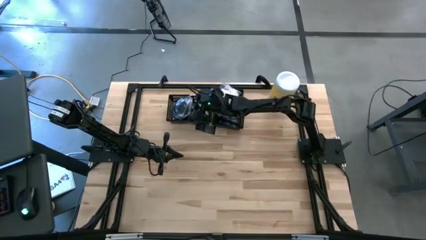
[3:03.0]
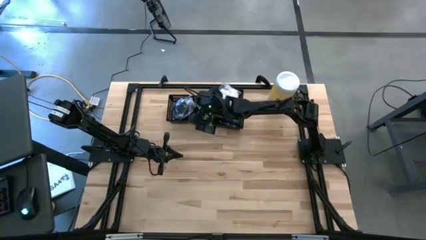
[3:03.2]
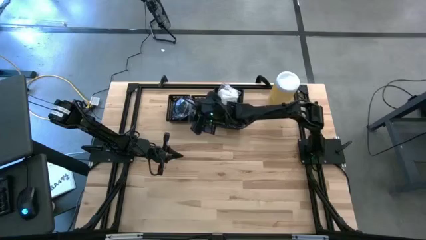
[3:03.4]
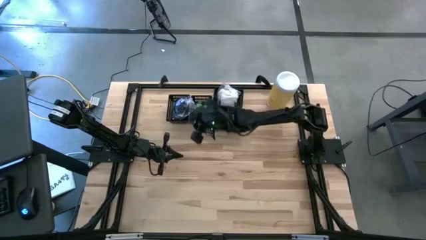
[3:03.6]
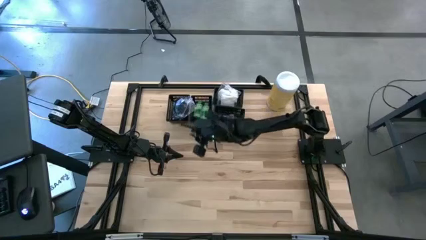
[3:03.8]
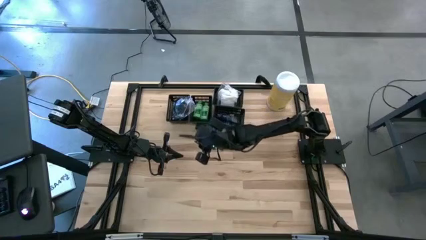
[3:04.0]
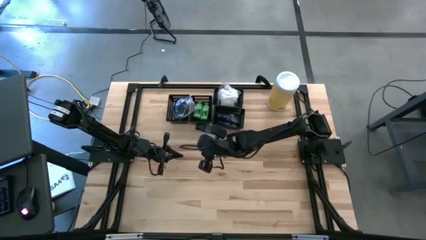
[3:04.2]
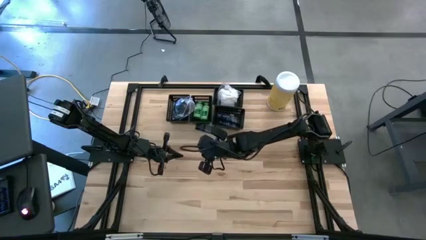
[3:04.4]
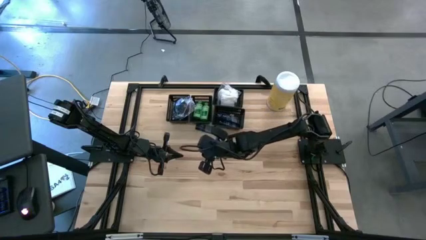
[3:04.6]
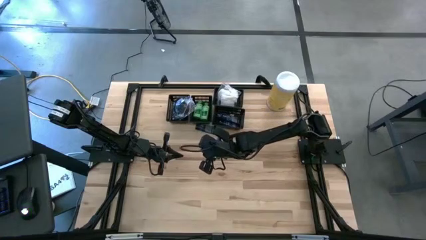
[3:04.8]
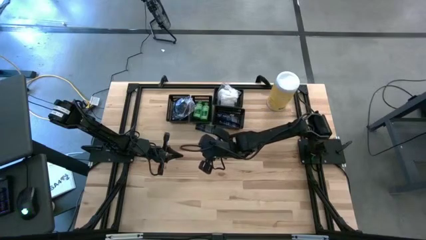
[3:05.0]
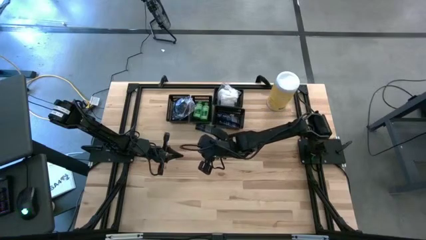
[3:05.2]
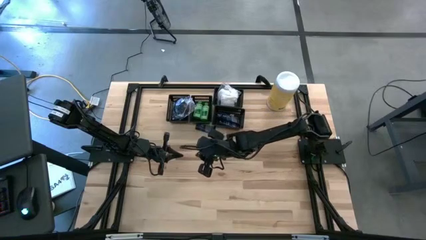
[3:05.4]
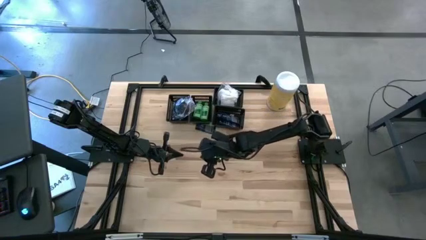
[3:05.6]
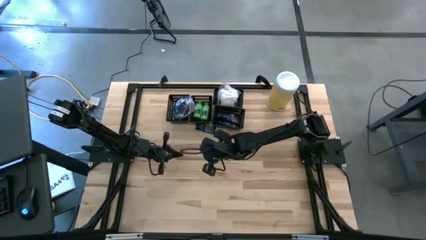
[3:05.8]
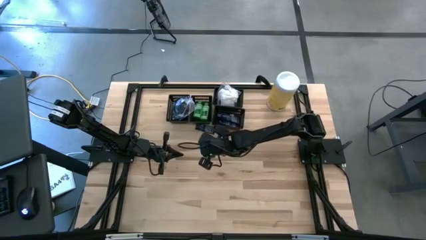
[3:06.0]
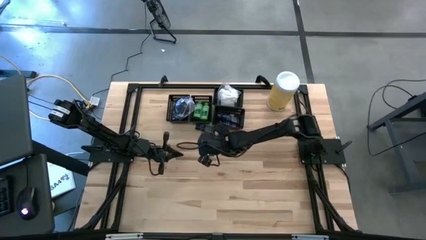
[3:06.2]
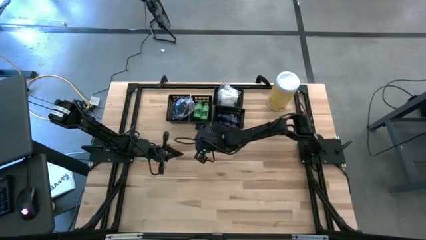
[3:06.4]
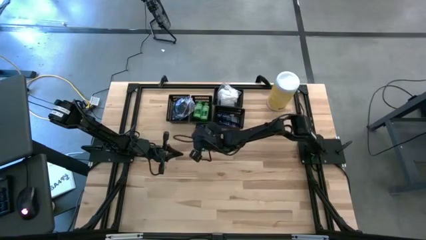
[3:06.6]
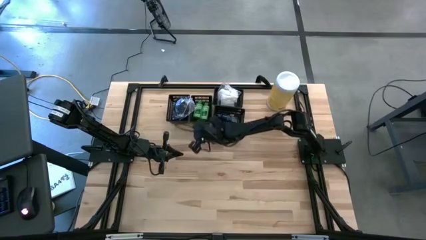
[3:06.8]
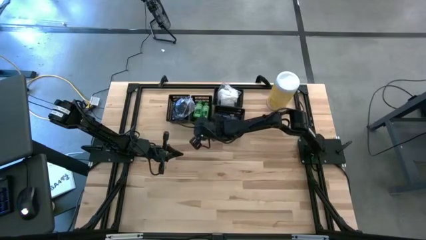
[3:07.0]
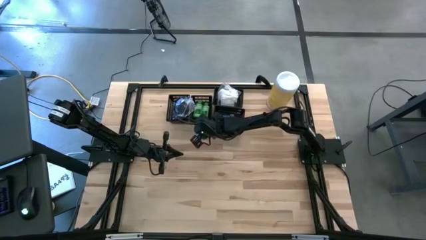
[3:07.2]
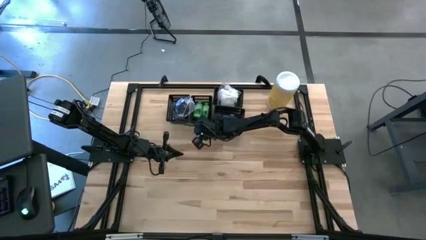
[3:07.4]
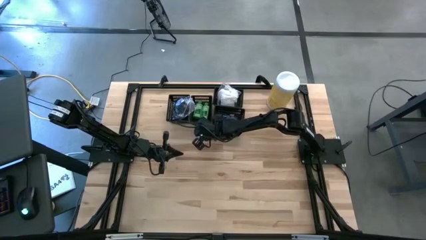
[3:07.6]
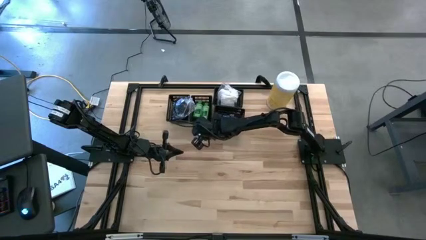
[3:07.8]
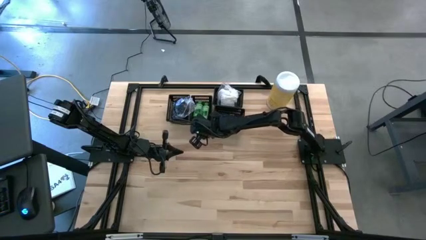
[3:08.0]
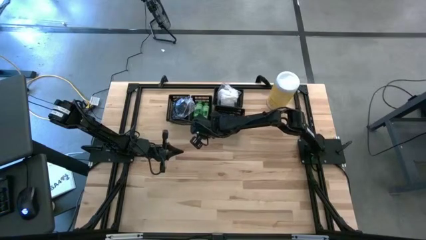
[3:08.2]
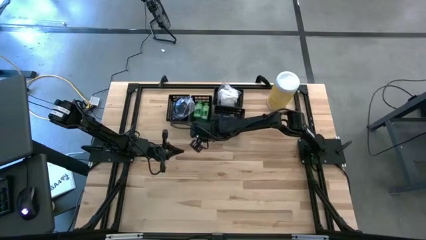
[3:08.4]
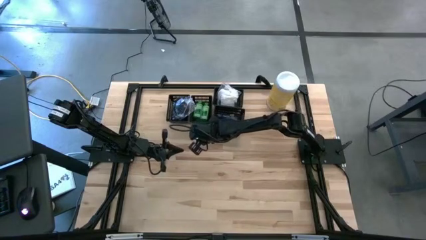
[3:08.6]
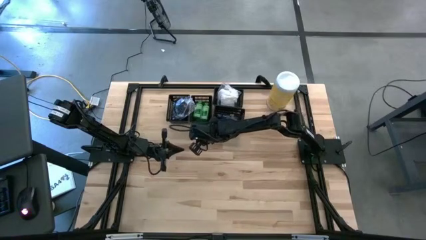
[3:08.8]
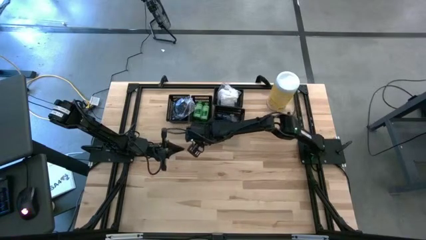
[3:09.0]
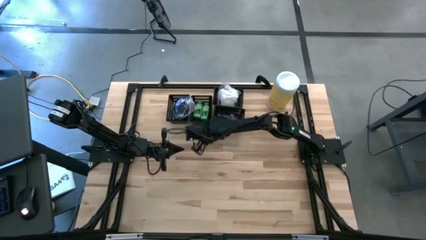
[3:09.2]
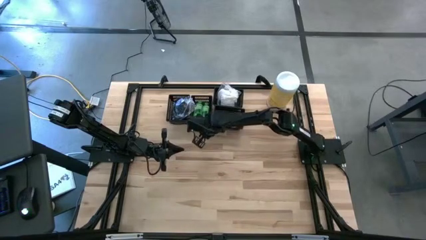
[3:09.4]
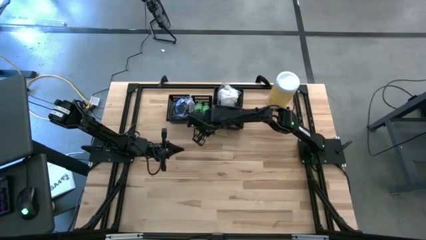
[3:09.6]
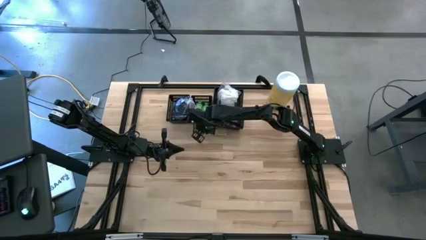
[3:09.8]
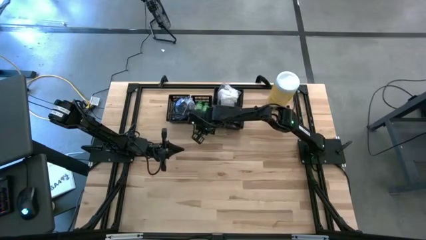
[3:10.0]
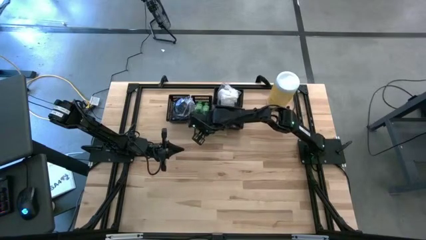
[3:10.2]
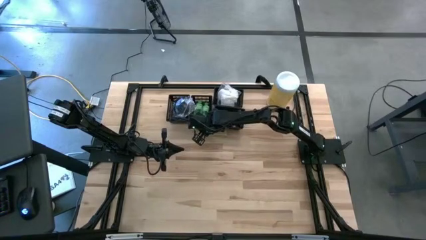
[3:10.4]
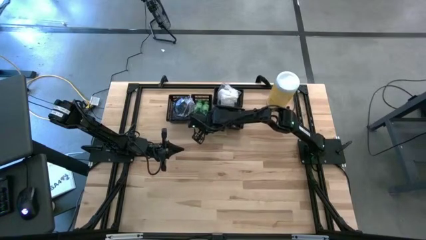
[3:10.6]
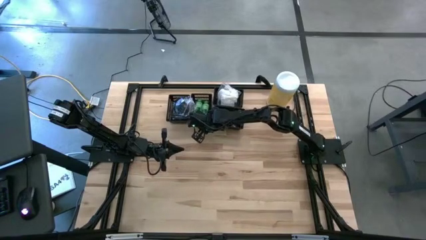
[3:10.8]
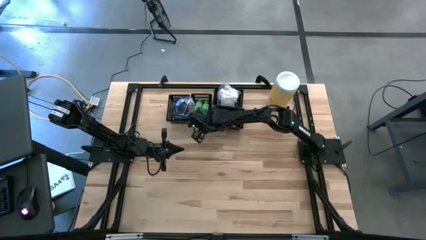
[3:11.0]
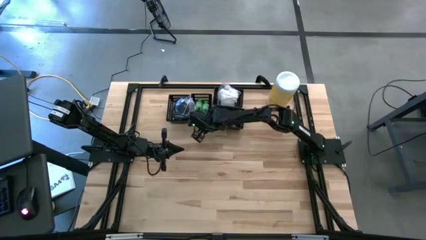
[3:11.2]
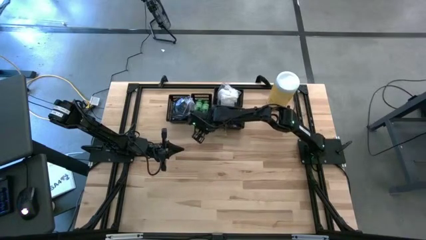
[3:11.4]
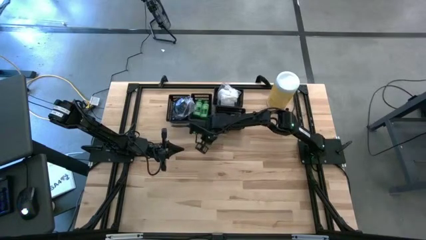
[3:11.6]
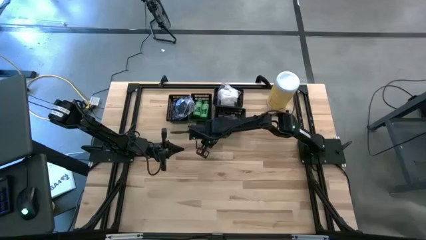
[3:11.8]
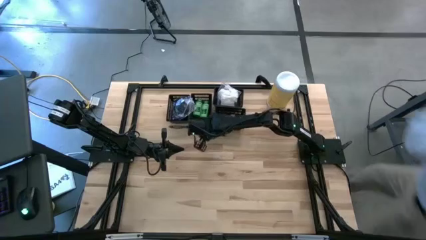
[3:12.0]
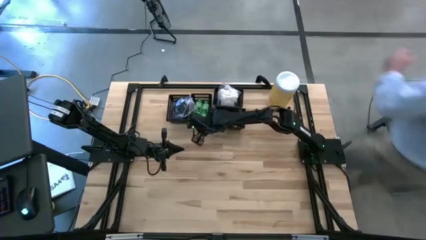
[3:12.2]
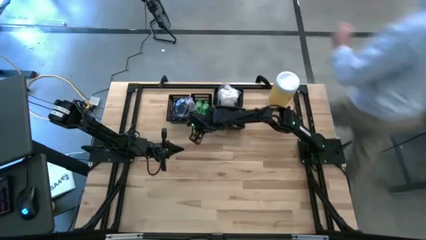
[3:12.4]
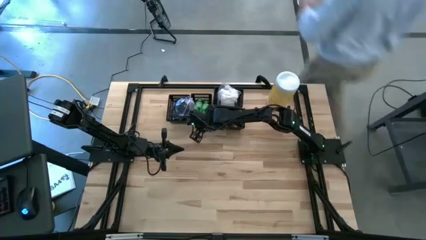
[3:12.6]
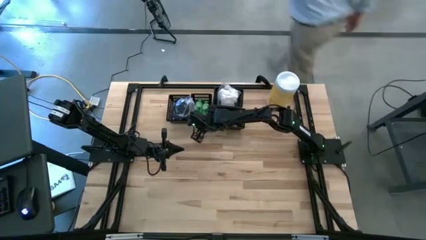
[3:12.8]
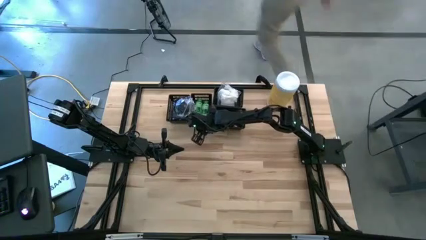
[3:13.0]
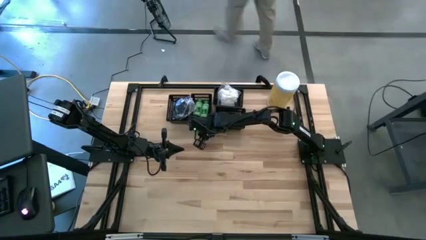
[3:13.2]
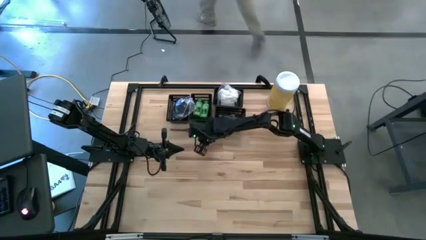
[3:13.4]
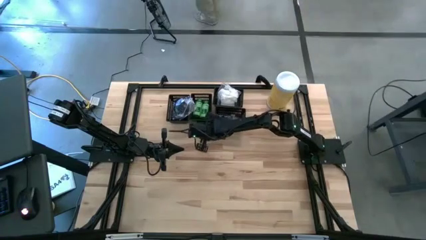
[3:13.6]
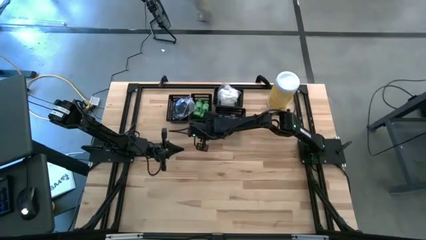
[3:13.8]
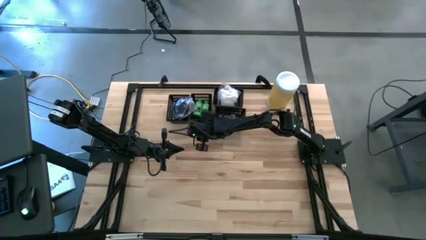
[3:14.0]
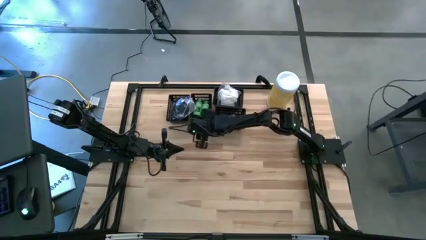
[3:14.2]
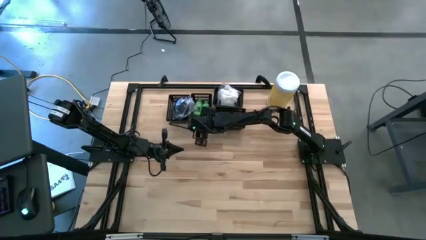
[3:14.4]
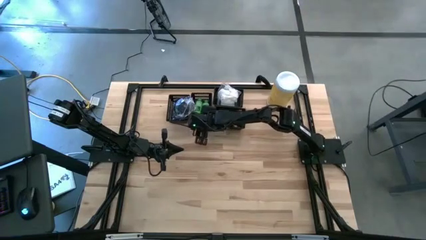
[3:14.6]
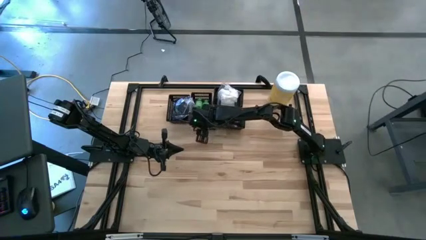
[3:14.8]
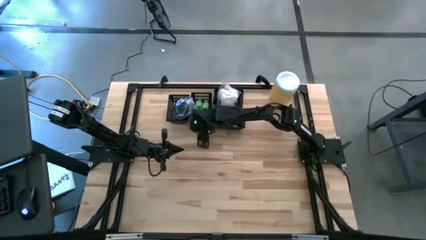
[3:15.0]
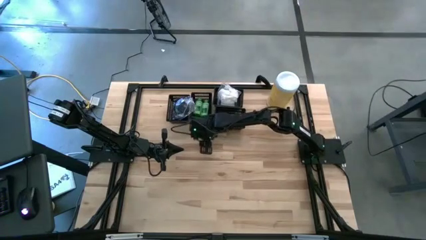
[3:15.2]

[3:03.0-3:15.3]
Task: Pick & Place Travel size toiletries
Move the blue shave cream to the center of the table

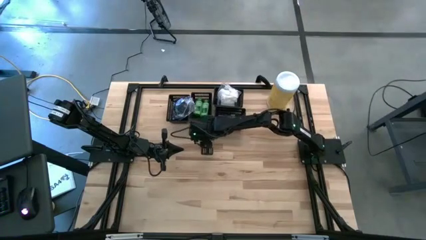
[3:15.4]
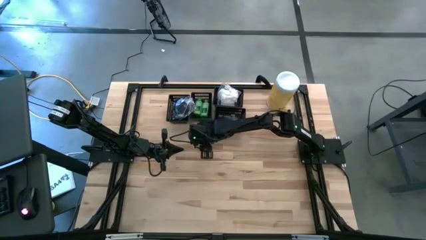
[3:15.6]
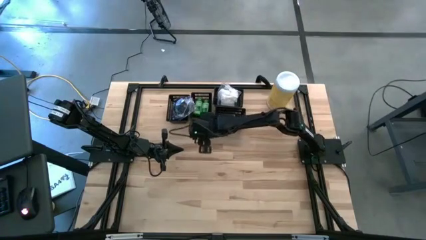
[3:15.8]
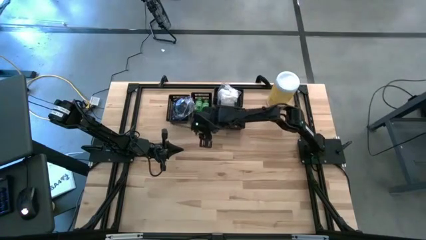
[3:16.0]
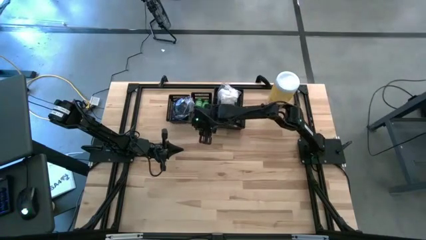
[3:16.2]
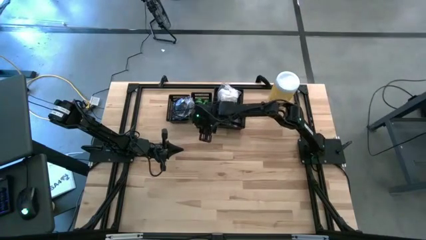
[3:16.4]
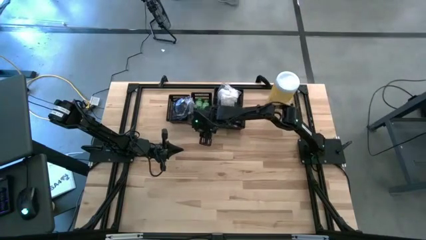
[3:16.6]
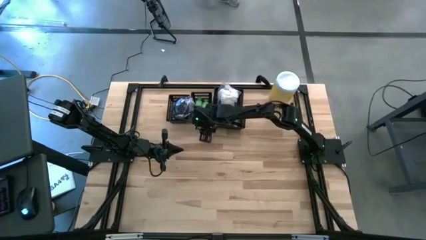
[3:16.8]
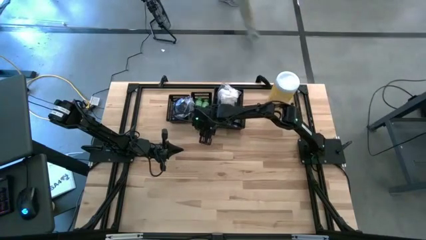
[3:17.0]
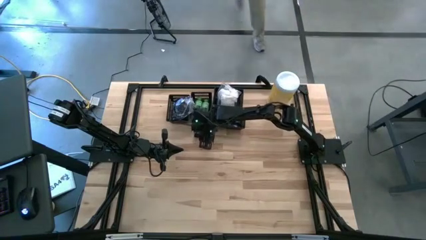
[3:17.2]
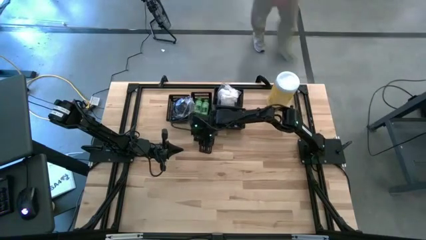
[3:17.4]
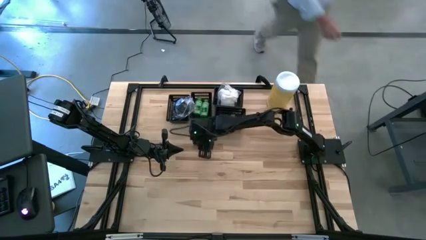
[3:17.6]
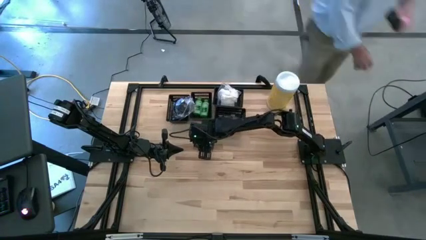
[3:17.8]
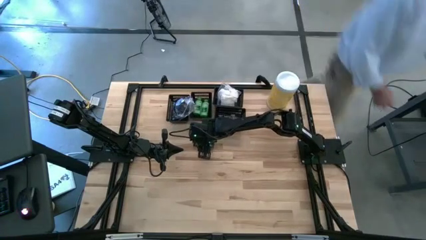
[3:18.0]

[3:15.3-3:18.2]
Move the blue shave cream to the center of the table

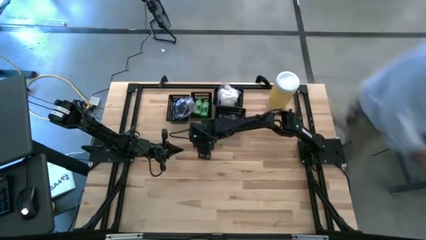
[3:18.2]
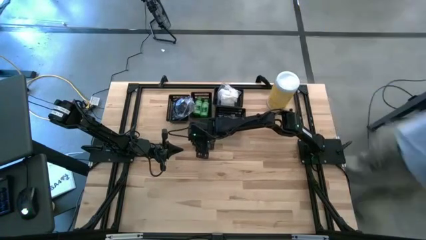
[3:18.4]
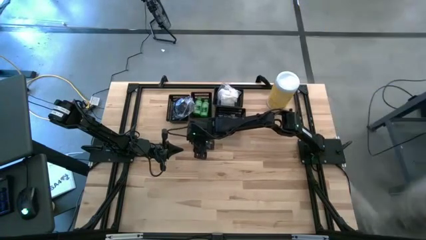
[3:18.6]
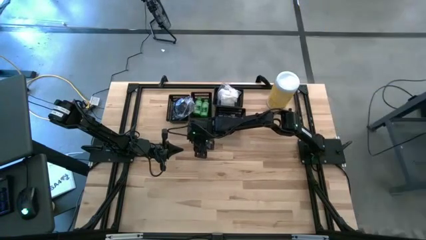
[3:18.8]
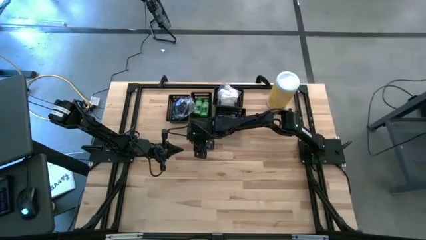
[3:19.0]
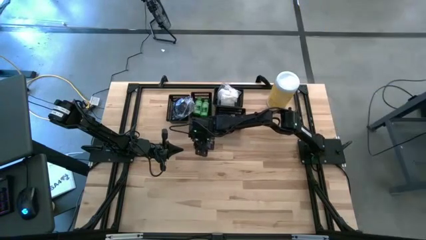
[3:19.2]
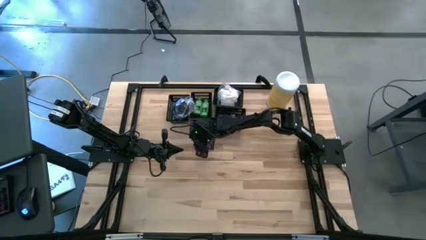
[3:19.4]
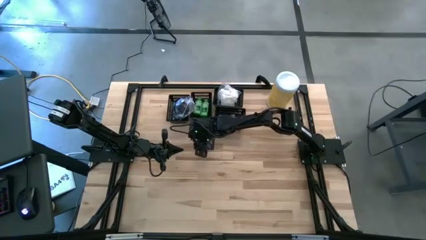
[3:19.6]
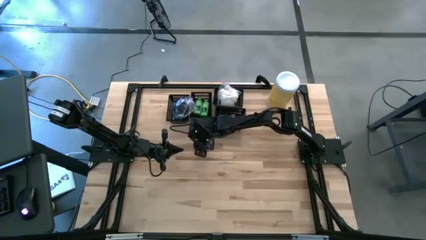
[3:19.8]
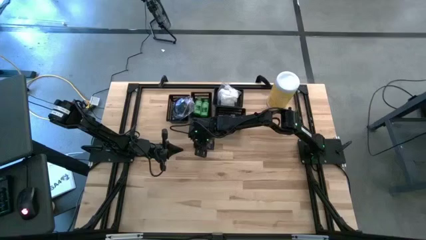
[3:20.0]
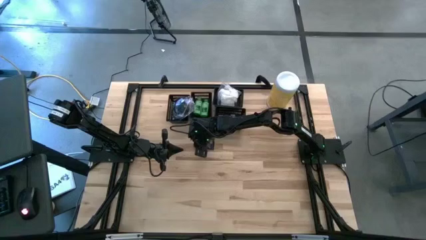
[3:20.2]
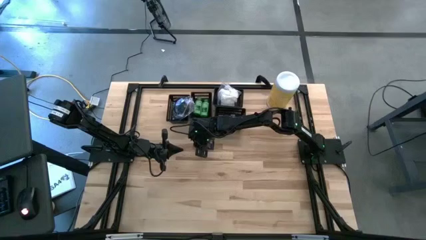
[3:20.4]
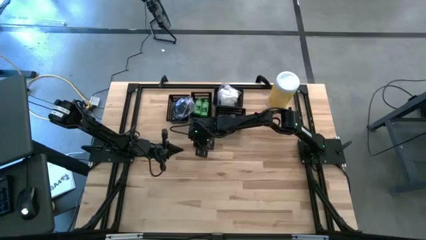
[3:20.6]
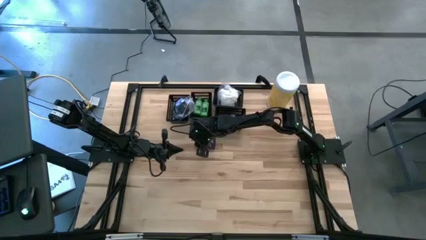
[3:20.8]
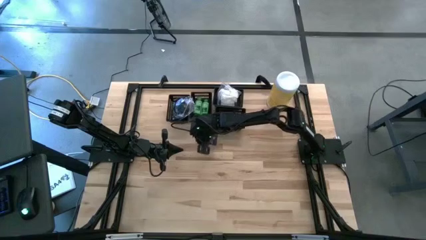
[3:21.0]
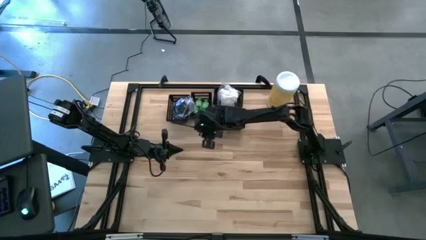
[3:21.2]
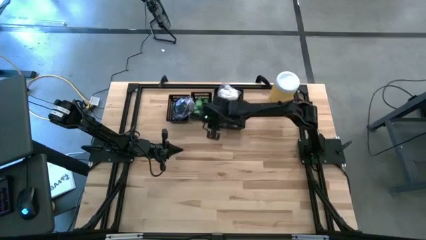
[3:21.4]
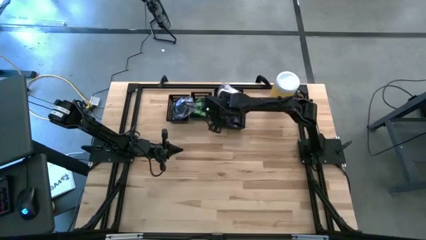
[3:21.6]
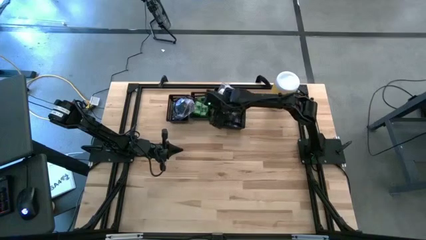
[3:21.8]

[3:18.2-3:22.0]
Put the blue shave cream into the bottom black bin
